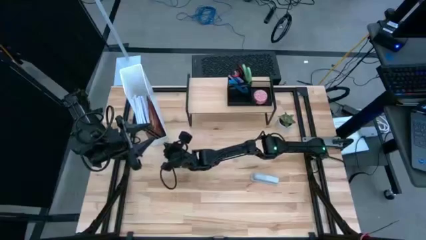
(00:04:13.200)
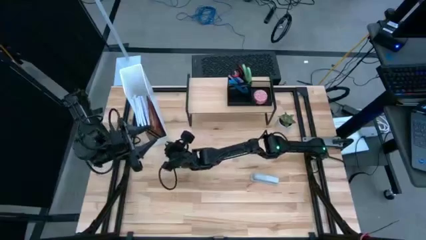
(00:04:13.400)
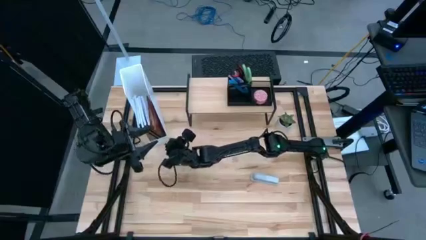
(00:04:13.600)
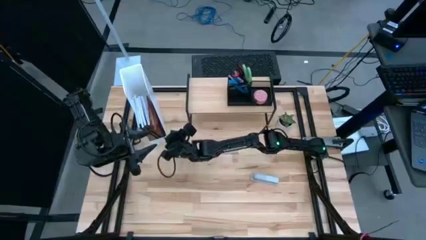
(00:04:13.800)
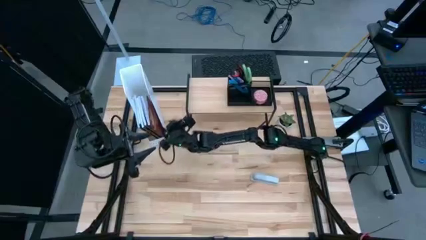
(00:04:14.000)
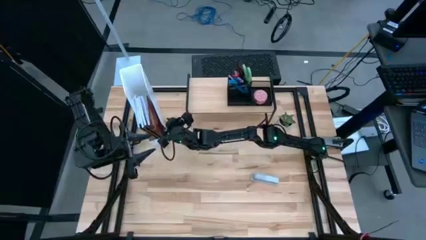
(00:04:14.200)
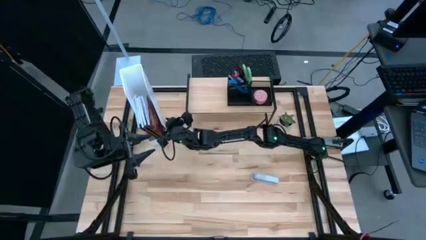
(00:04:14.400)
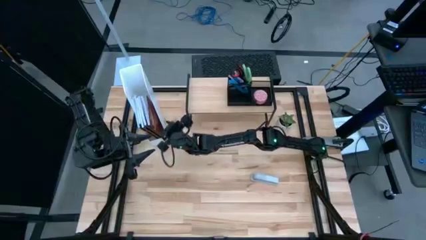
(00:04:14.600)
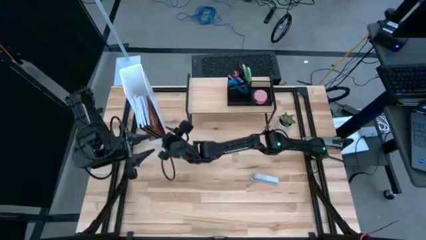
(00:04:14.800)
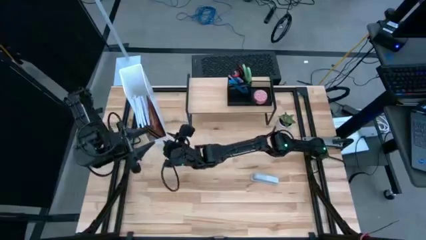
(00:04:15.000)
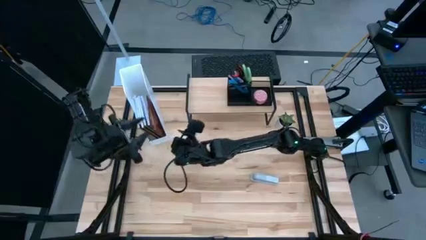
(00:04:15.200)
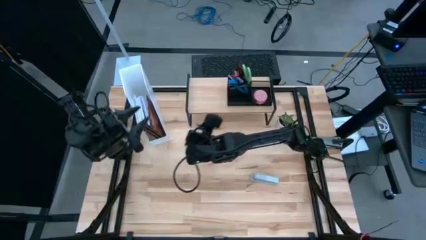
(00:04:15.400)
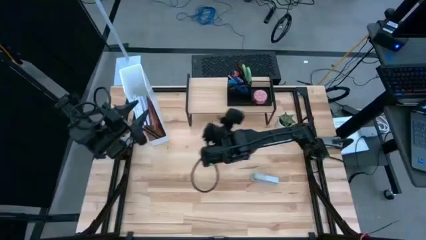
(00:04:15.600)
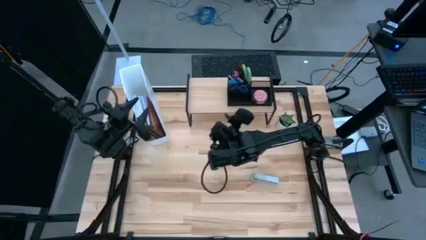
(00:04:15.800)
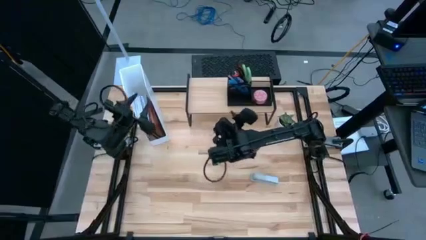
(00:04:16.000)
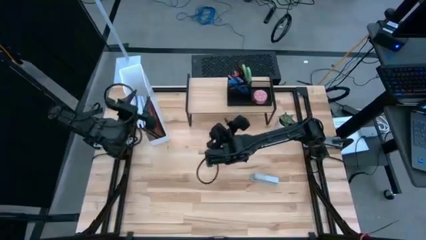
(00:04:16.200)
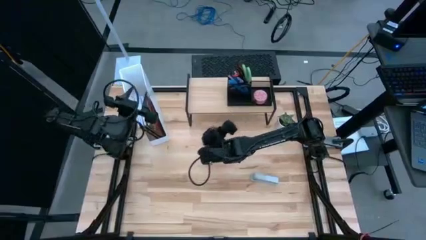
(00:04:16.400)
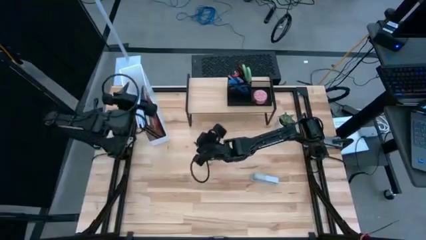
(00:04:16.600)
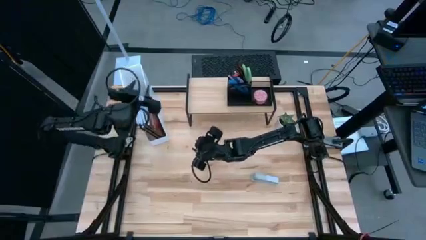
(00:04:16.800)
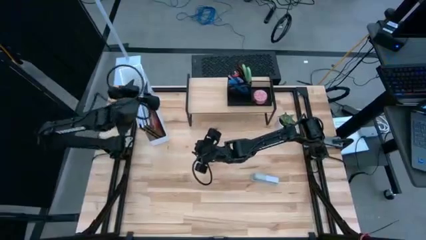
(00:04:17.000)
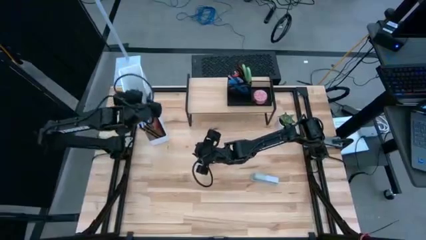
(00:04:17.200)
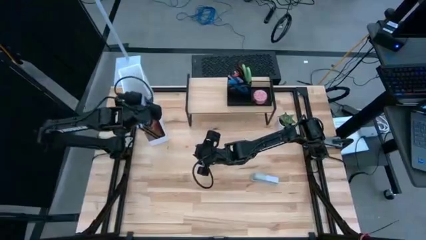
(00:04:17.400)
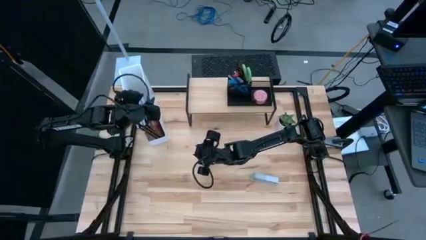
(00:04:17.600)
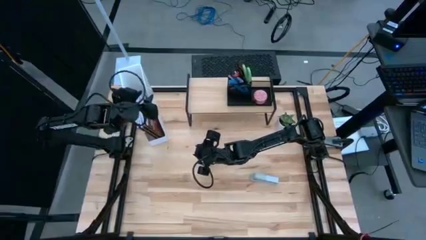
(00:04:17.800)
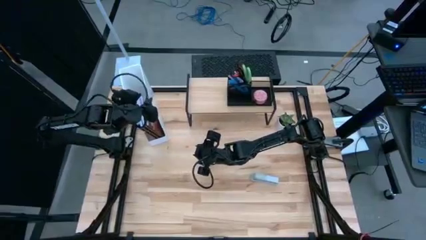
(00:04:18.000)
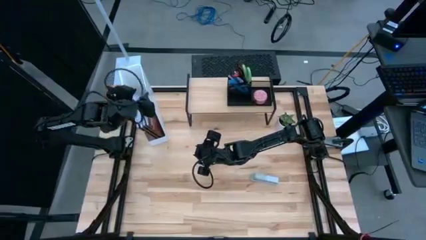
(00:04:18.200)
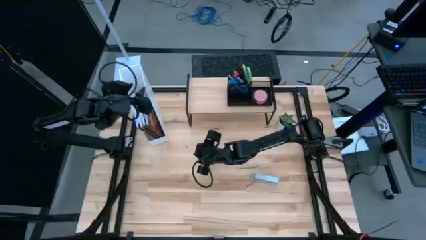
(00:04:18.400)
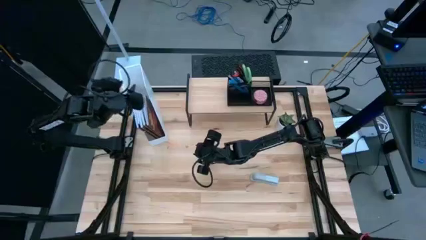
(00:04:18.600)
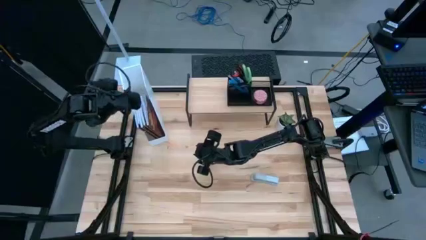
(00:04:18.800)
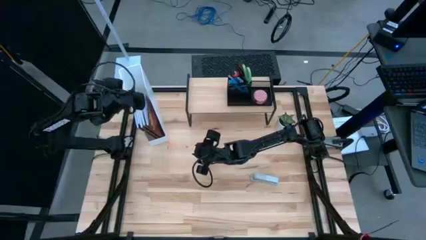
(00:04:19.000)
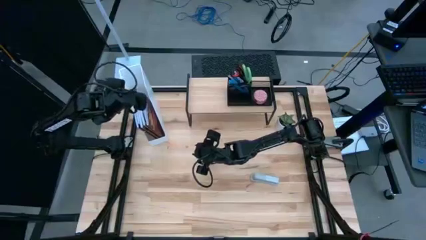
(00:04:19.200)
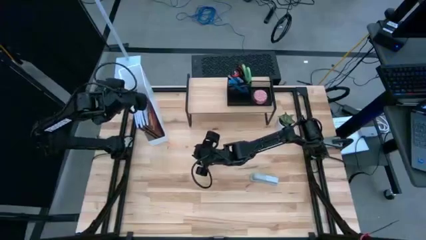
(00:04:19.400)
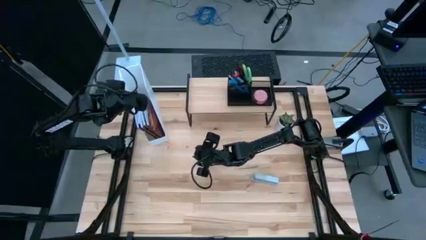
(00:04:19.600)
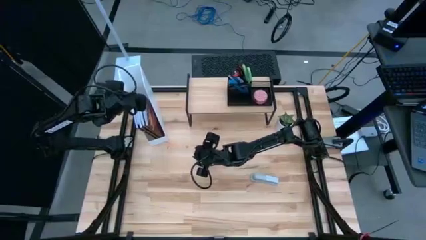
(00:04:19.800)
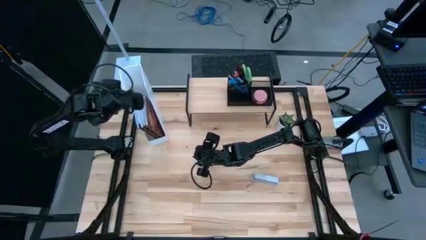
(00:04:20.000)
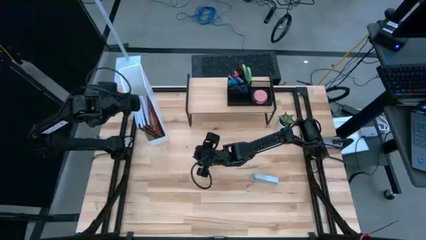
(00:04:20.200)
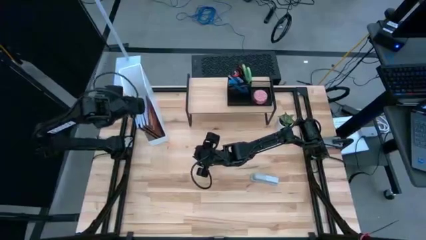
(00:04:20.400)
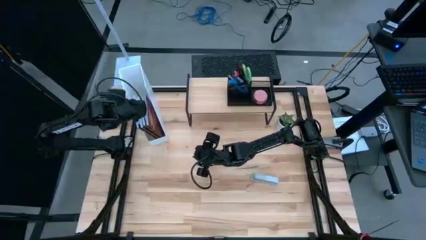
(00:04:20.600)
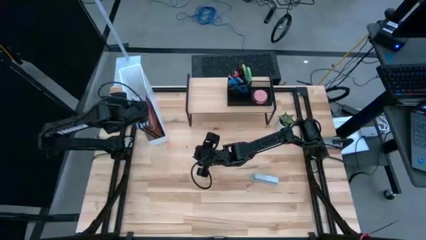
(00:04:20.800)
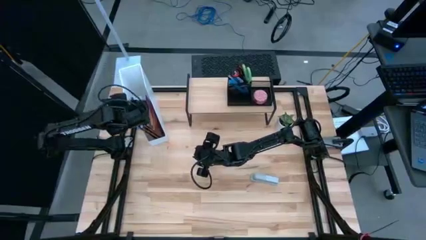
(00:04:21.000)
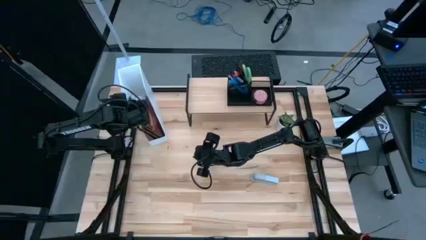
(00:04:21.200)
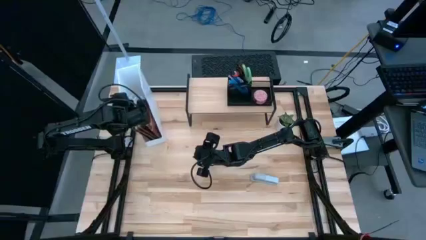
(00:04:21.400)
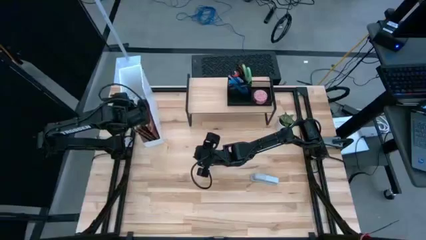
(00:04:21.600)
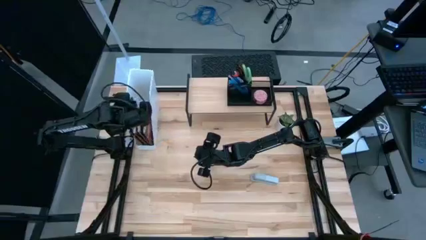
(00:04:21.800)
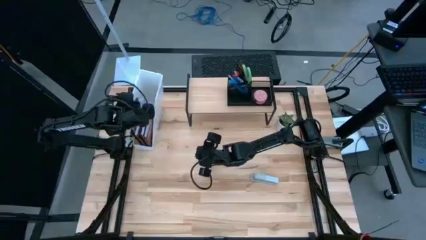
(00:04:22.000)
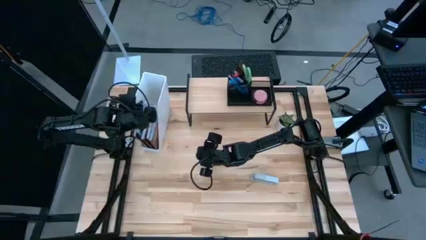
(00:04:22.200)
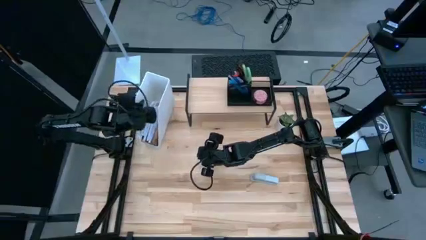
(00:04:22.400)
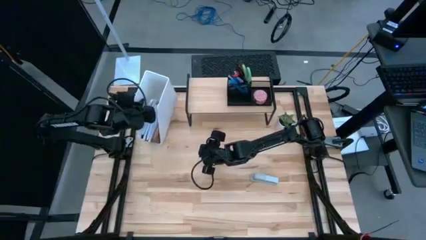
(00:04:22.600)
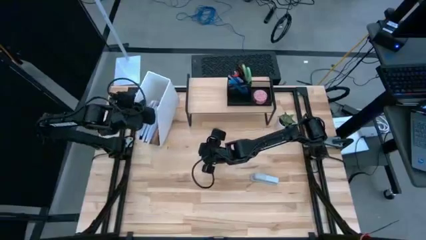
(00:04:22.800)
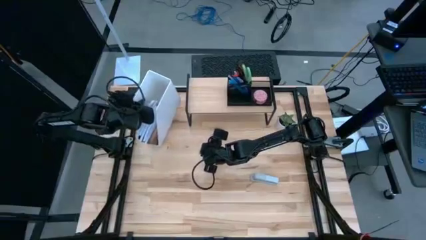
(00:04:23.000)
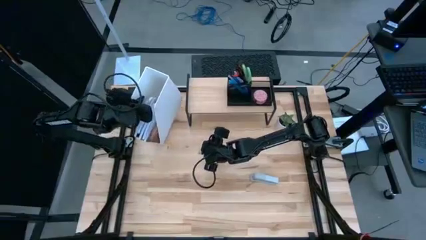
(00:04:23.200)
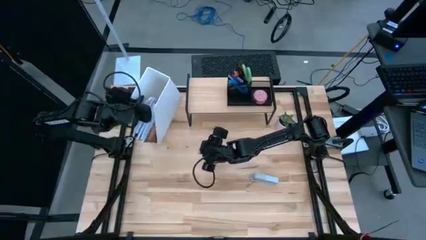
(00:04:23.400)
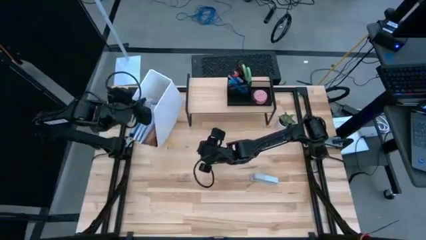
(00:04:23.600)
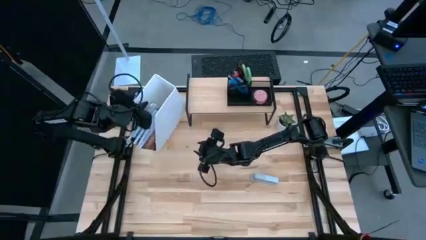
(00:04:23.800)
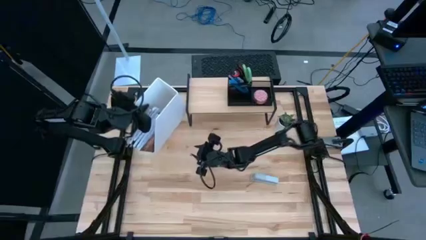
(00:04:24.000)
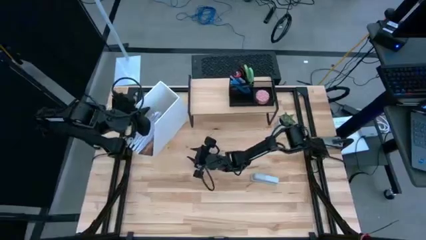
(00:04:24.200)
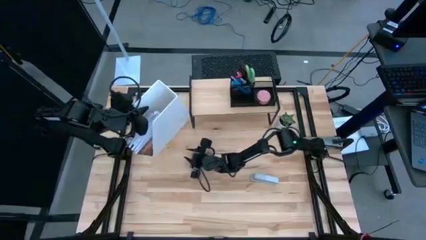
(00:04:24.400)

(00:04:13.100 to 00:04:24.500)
Task: Stock shelves
Put the white bookshelf on the shelf
